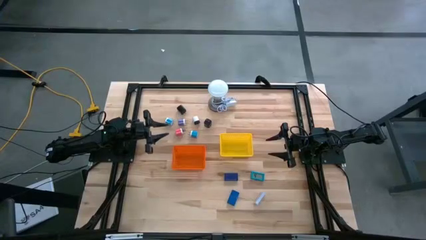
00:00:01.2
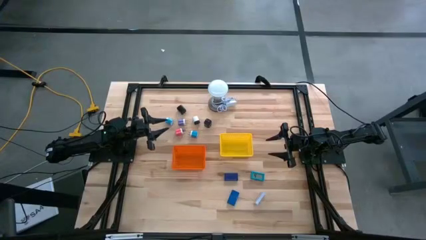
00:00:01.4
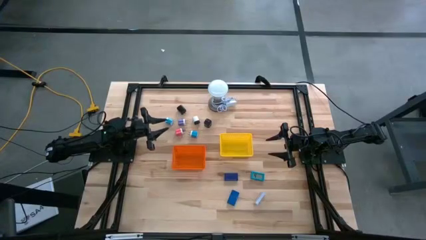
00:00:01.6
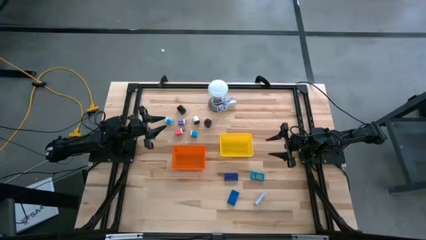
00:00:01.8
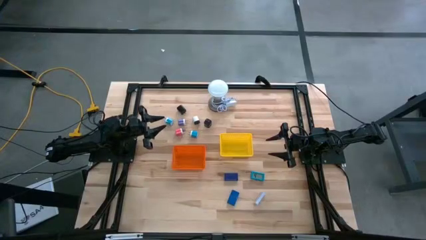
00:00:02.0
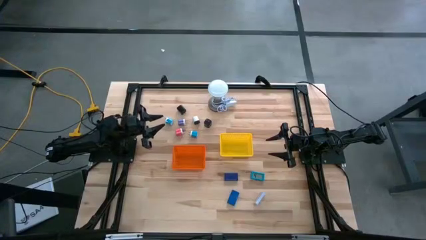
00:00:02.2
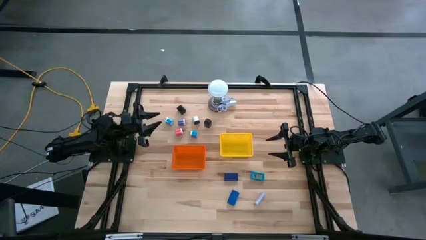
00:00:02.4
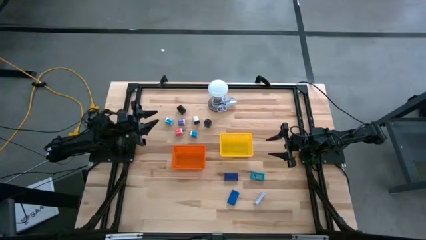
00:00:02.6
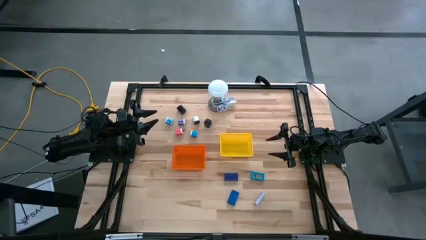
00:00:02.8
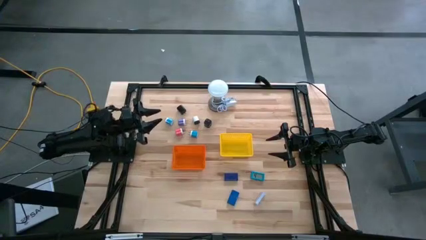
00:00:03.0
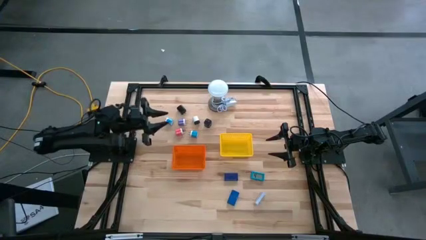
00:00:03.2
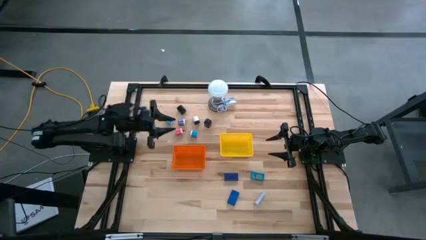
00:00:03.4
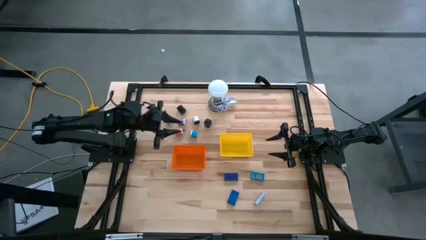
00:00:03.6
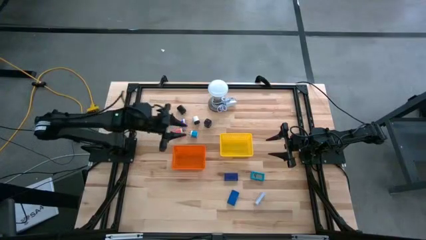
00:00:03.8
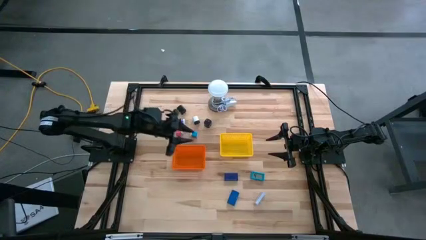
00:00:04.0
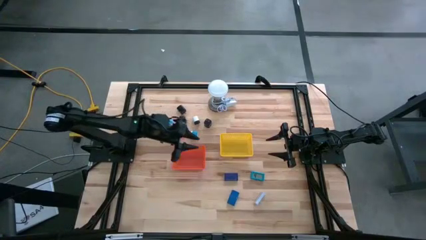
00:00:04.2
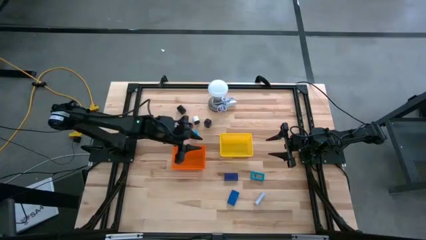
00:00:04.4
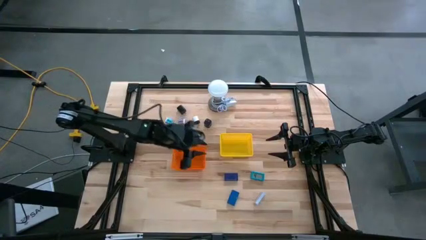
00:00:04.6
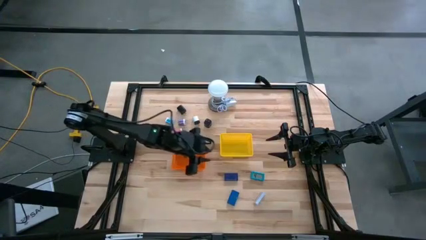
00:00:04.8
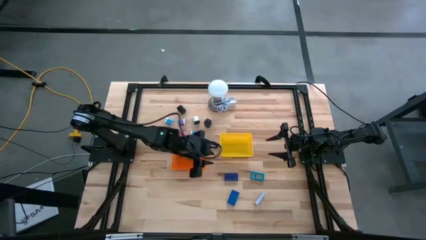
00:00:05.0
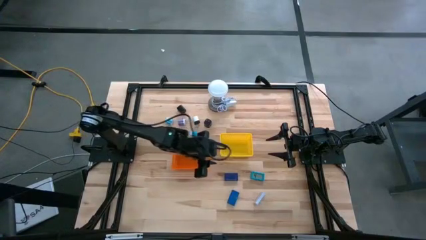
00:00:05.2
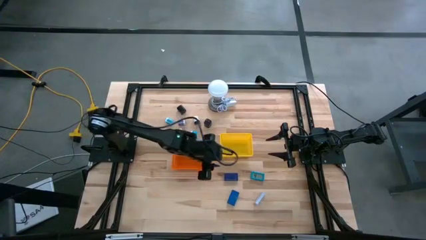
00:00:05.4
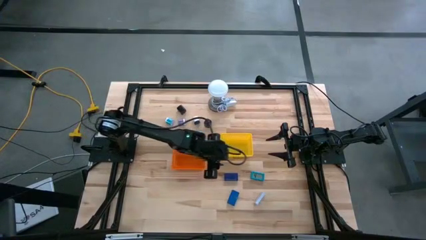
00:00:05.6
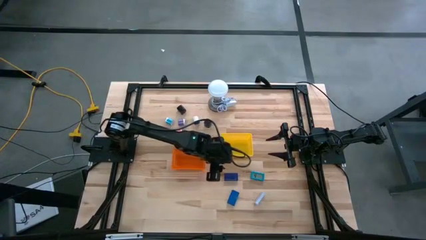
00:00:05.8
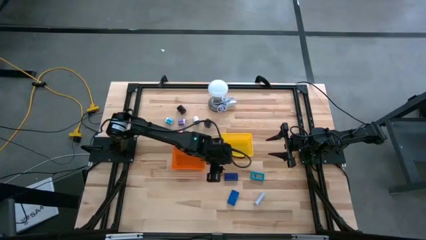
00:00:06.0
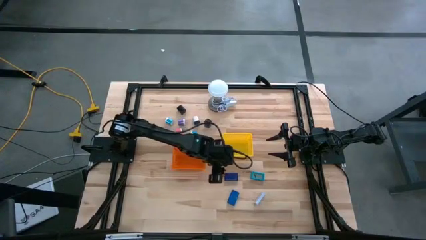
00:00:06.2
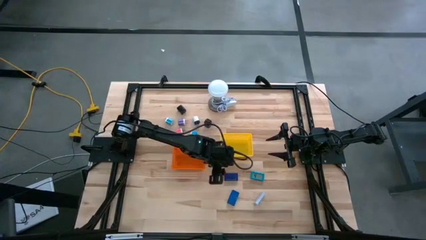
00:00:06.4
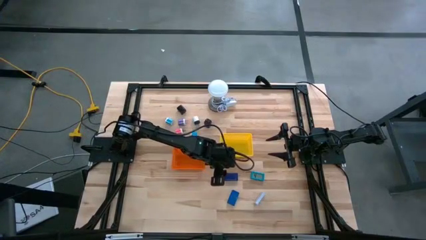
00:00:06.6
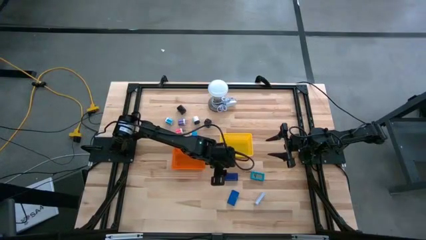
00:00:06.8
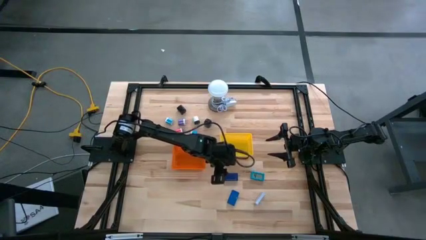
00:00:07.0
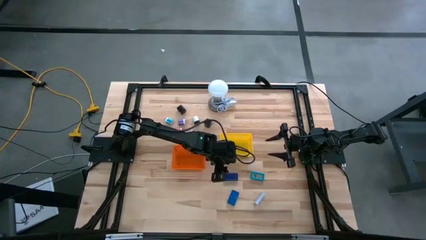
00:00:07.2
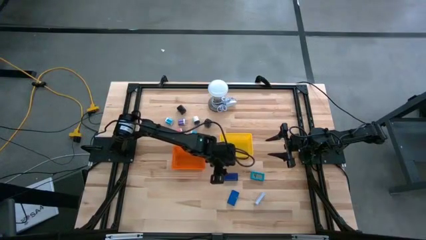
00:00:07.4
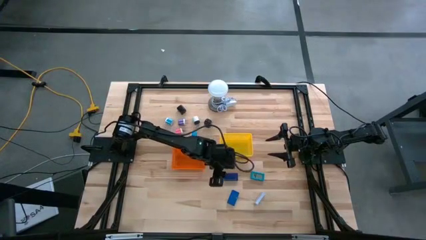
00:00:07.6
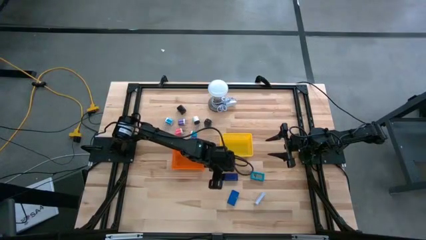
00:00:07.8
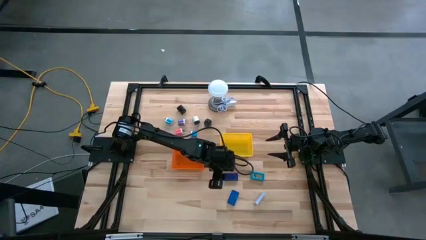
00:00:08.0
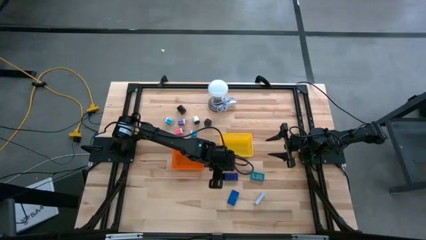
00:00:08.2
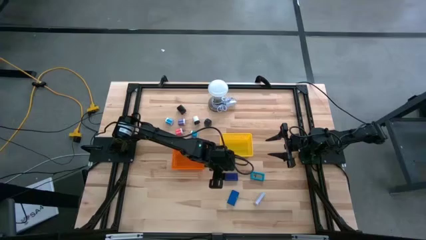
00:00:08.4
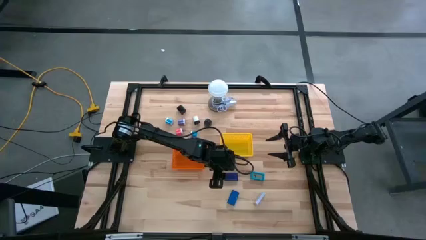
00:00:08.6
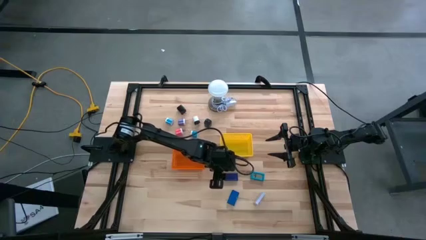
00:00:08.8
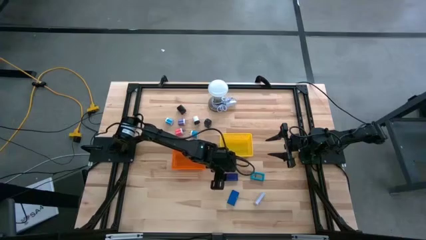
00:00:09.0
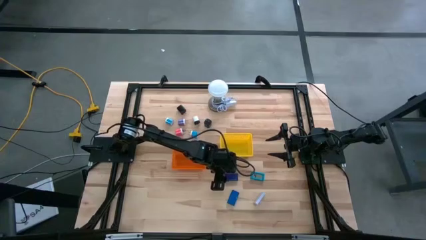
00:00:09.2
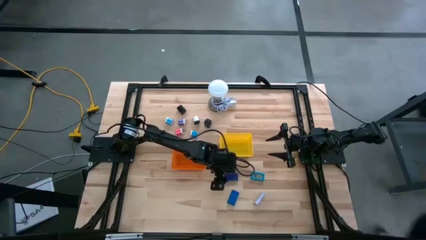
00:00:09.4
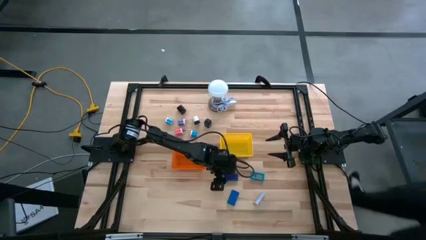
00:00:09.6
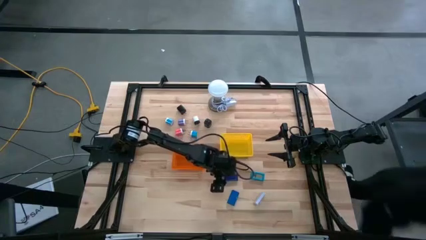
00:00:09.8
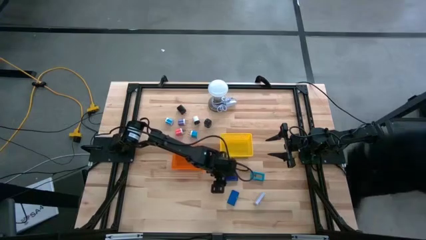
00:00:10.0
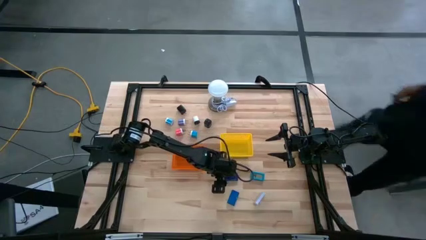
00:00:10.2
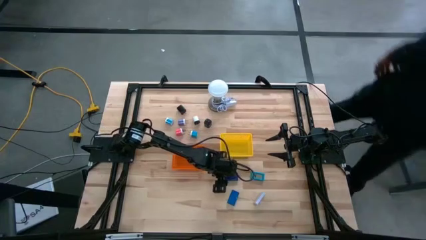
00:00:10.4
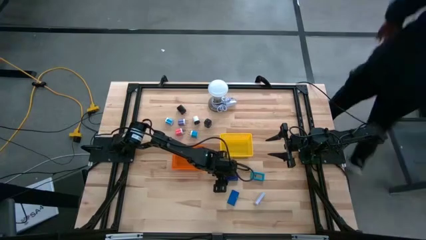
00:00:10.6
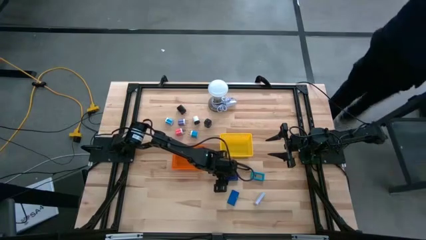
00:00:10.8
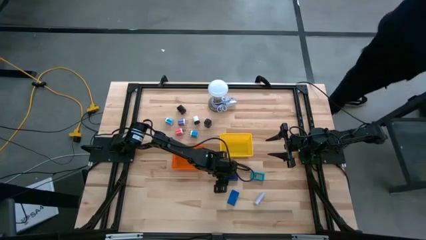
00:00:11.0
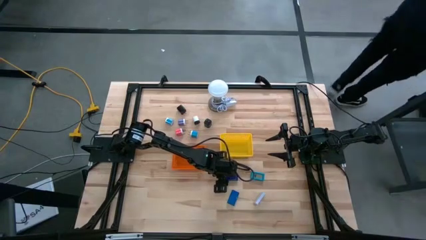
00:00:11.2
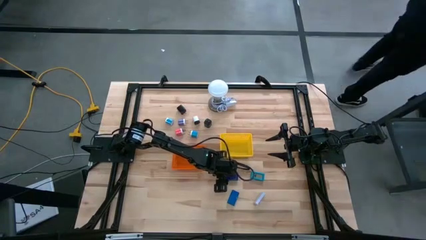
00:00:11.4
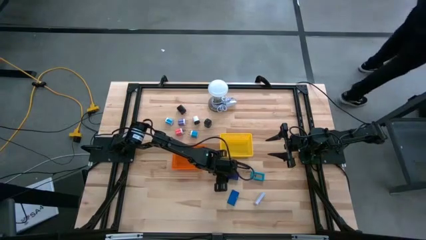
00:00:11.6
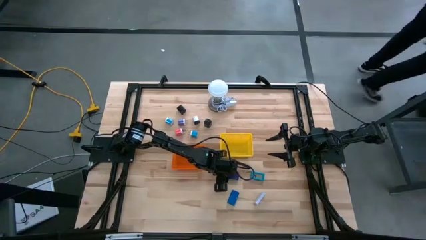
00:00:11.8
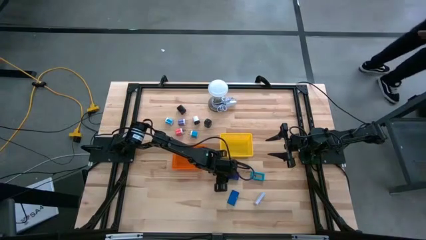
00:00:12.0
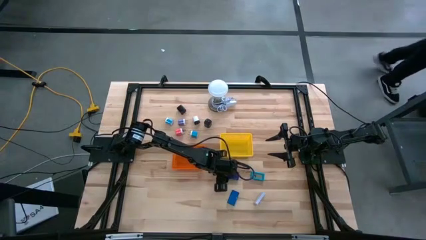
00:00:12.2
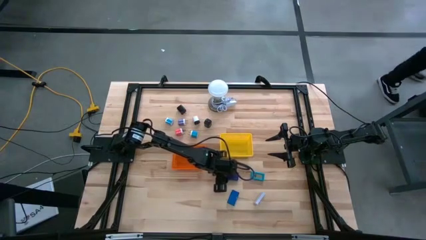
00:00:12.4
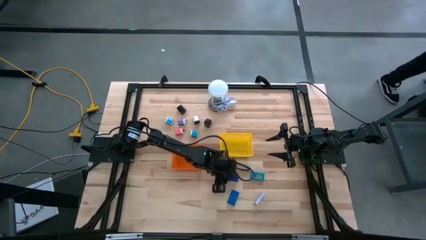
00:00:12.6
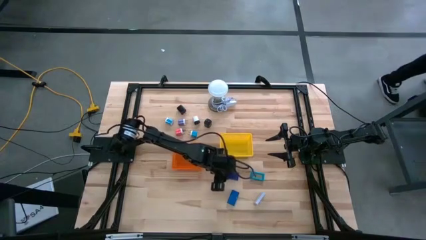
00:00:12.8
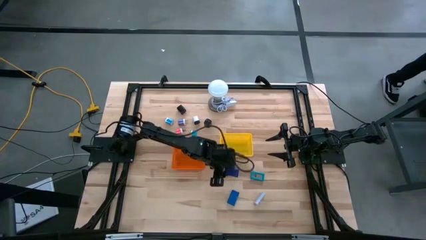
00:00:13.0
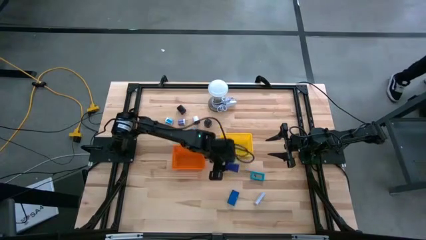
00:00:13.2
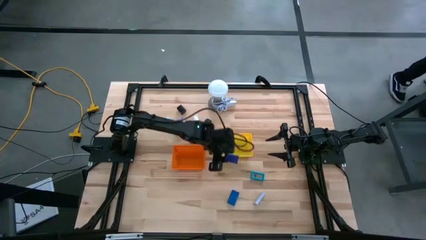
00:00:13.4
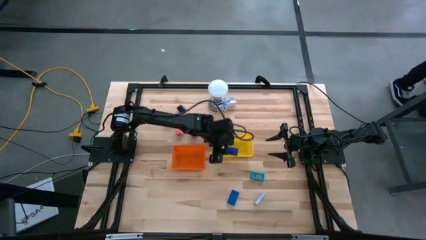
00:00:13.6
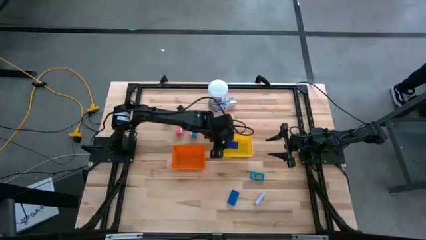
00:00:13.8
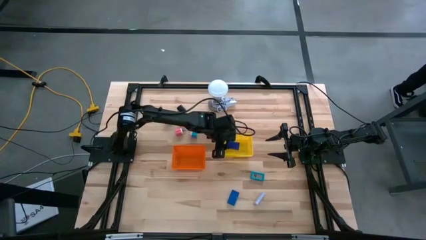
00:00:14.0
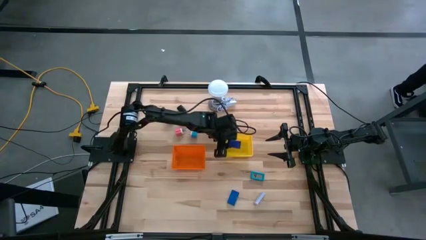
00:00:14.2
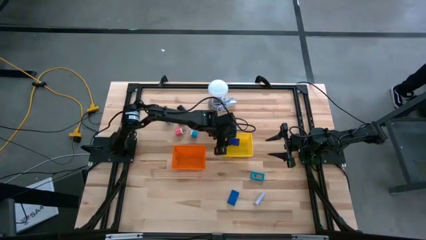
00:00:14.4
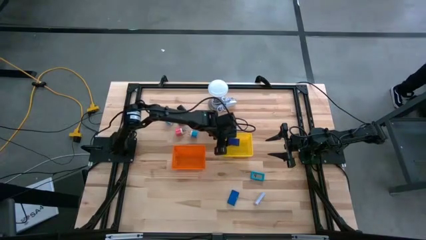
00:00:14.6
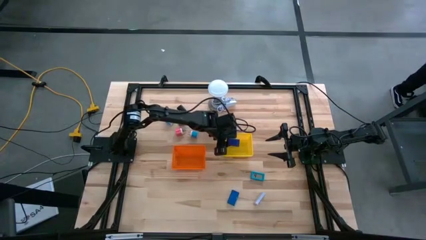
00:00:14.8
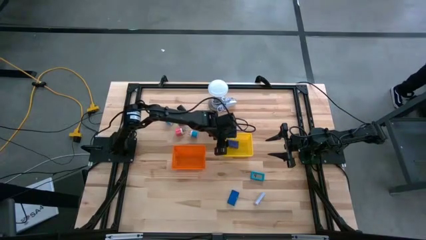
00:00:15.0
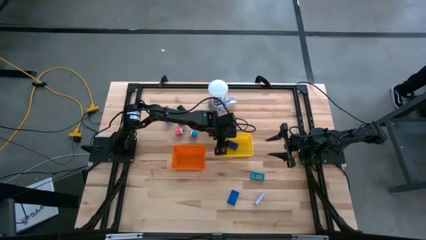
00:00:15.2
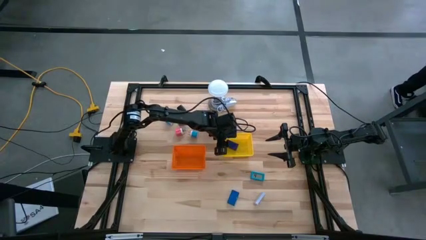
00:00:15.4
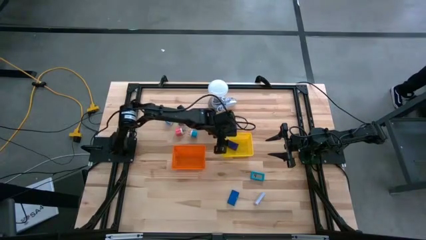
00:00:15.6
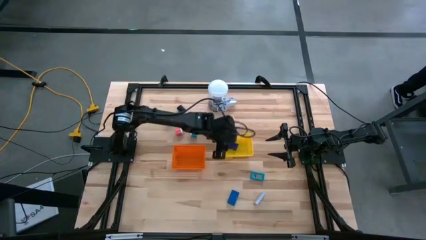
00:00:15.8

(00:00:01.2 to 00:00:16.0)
Task: Pick & Place Office items
Put the top blue digital clock into the yellow bin
